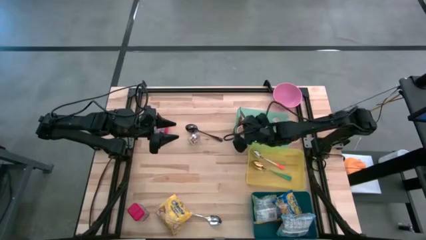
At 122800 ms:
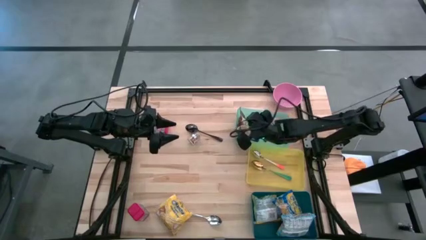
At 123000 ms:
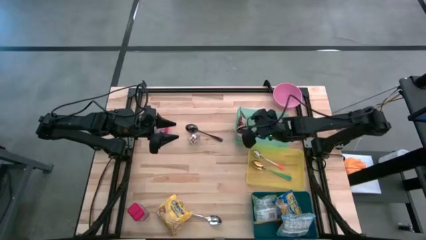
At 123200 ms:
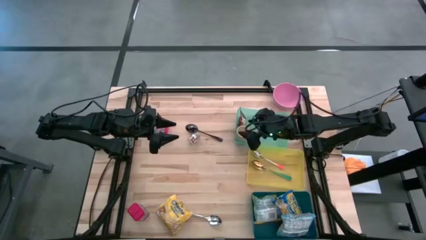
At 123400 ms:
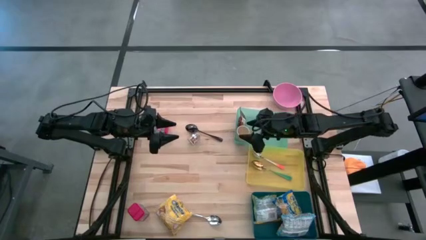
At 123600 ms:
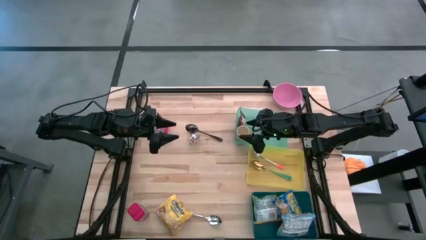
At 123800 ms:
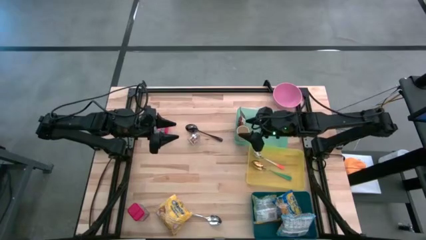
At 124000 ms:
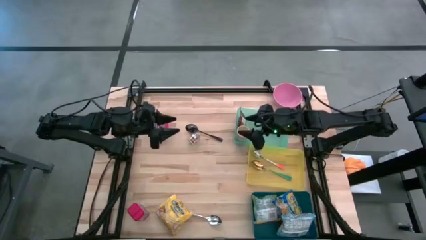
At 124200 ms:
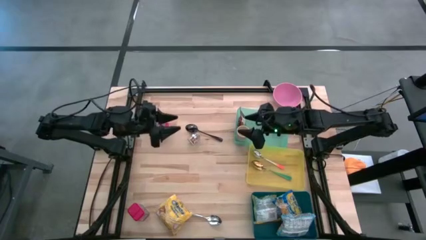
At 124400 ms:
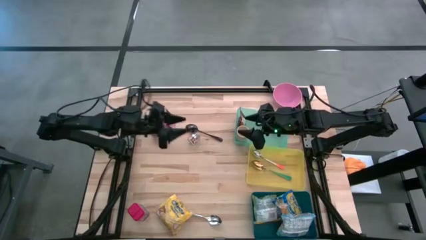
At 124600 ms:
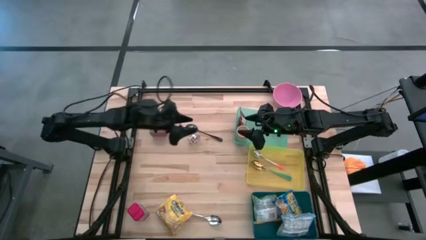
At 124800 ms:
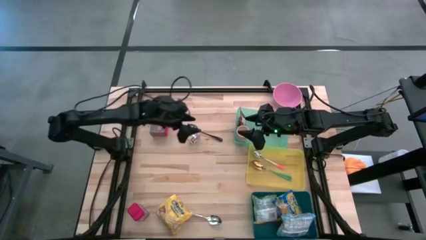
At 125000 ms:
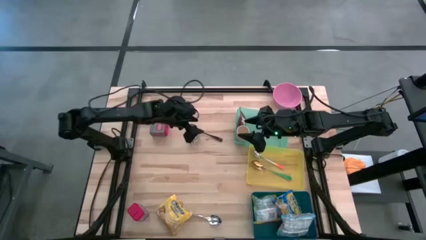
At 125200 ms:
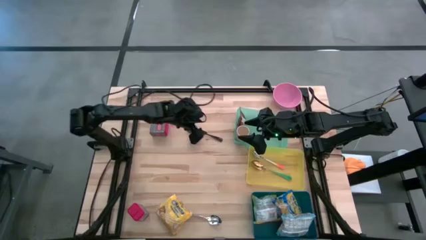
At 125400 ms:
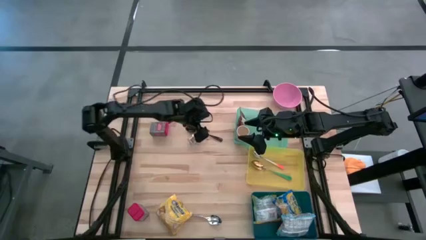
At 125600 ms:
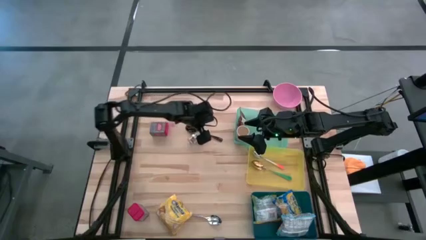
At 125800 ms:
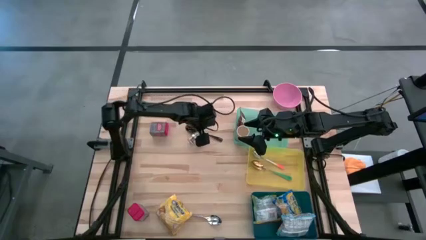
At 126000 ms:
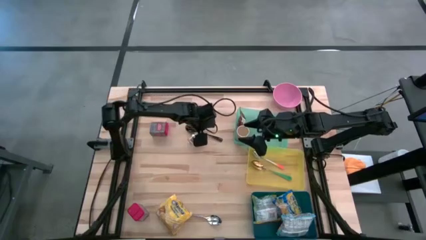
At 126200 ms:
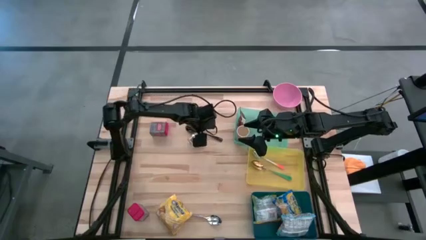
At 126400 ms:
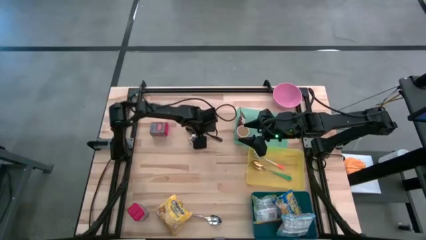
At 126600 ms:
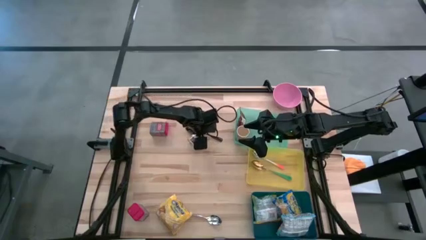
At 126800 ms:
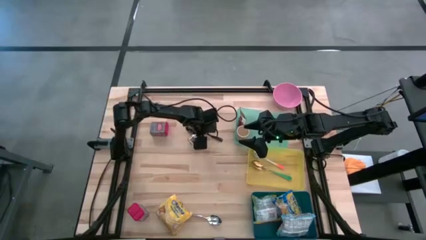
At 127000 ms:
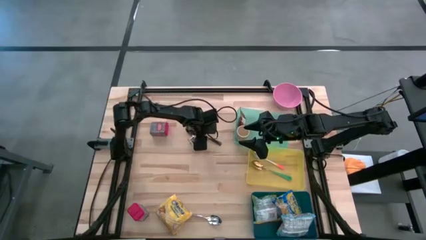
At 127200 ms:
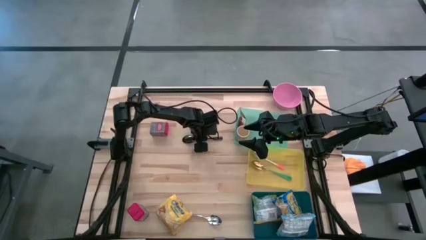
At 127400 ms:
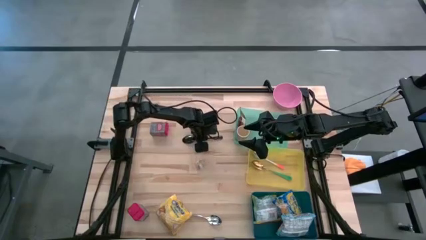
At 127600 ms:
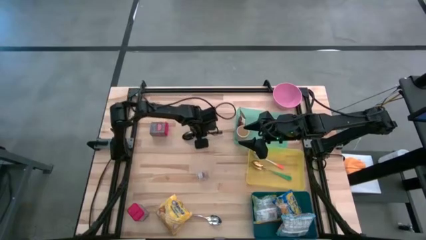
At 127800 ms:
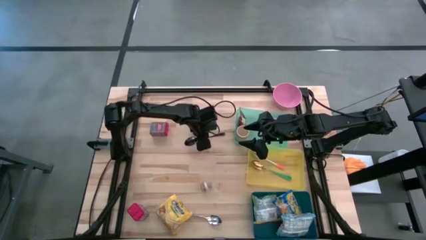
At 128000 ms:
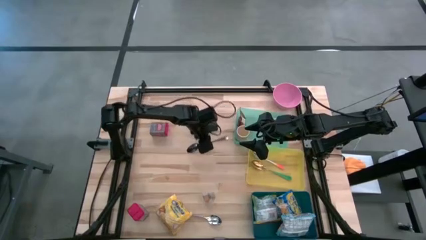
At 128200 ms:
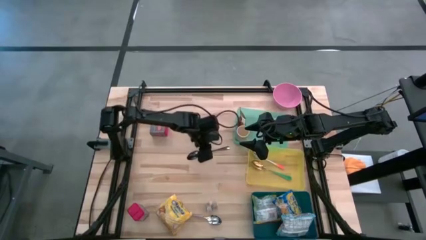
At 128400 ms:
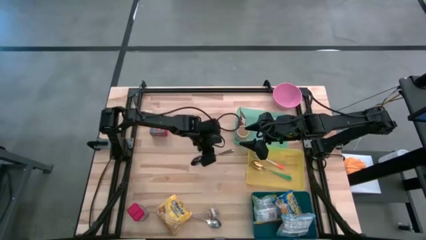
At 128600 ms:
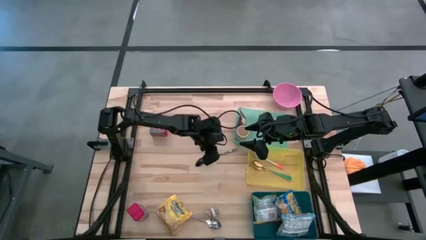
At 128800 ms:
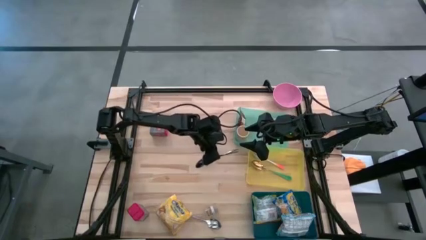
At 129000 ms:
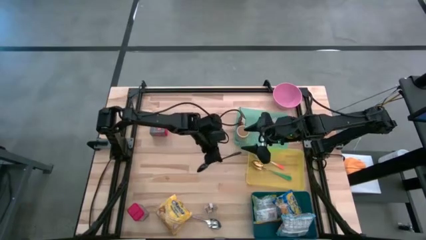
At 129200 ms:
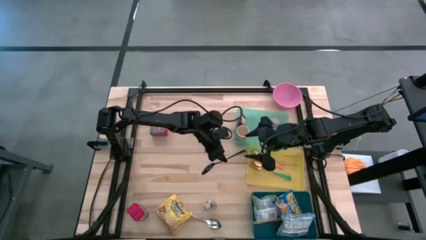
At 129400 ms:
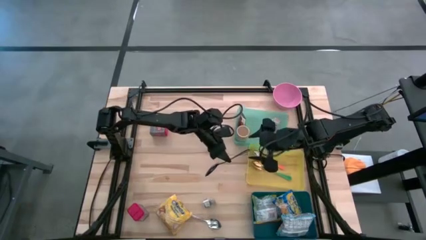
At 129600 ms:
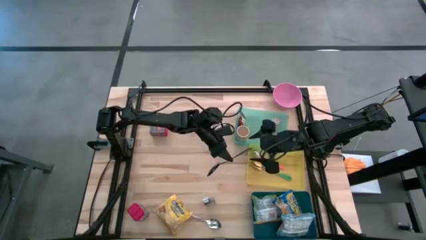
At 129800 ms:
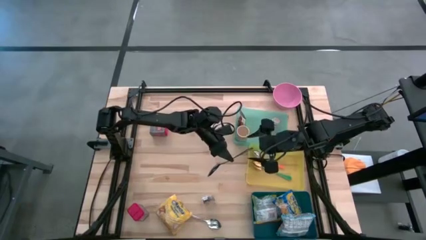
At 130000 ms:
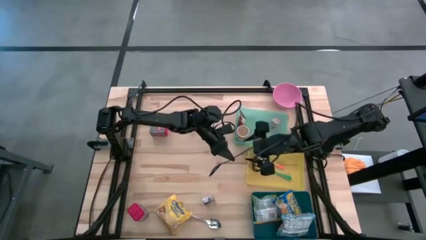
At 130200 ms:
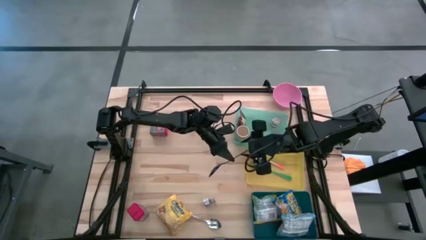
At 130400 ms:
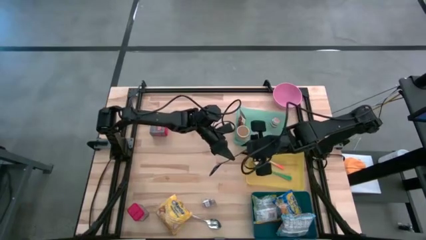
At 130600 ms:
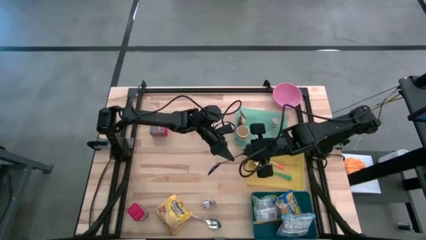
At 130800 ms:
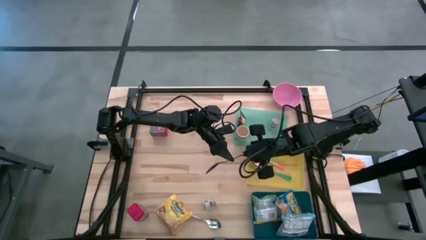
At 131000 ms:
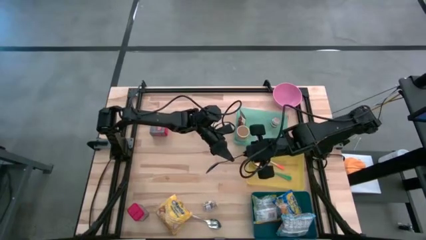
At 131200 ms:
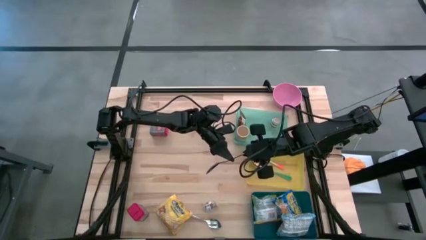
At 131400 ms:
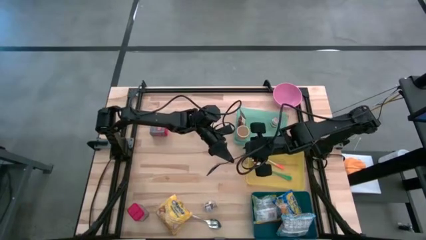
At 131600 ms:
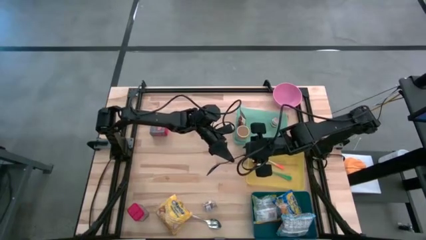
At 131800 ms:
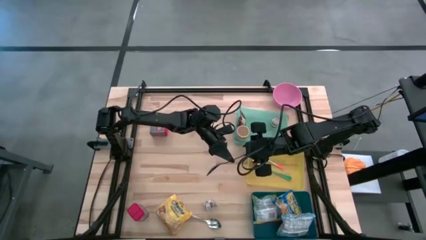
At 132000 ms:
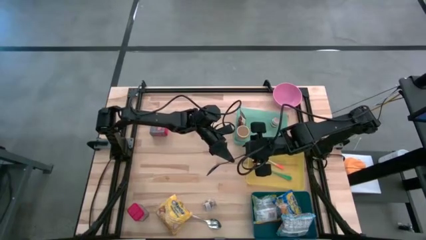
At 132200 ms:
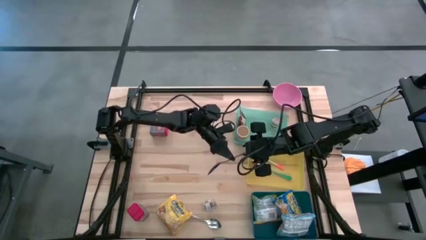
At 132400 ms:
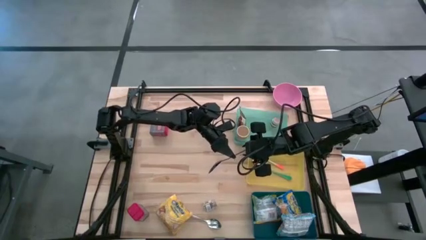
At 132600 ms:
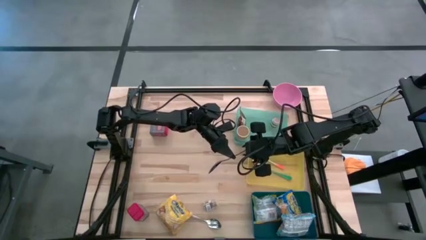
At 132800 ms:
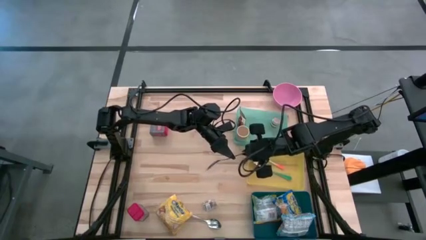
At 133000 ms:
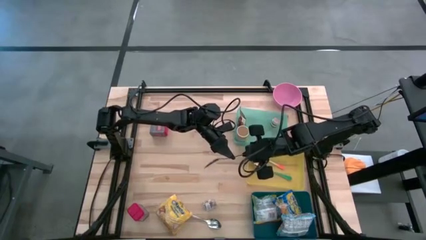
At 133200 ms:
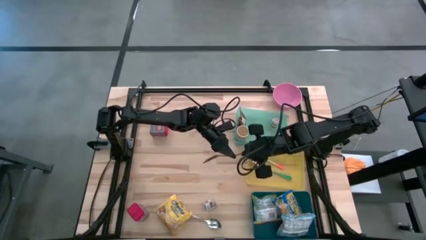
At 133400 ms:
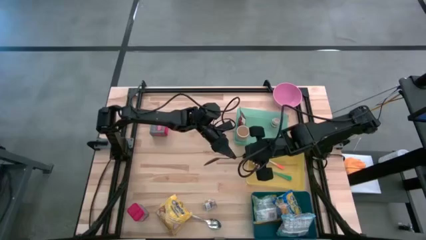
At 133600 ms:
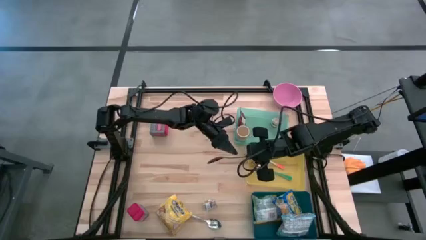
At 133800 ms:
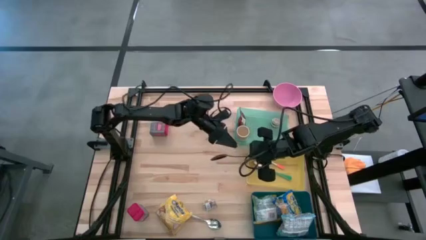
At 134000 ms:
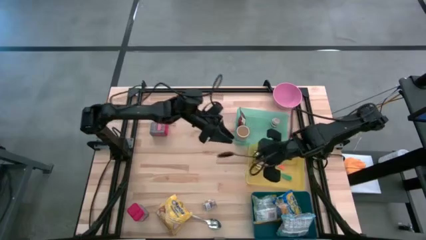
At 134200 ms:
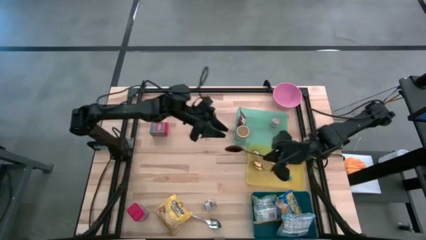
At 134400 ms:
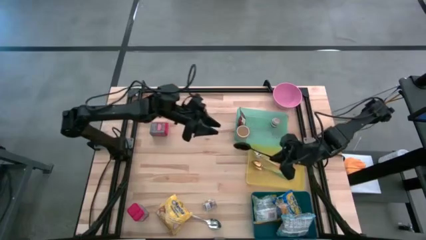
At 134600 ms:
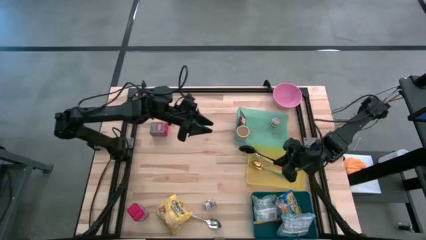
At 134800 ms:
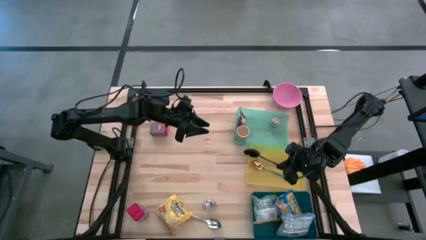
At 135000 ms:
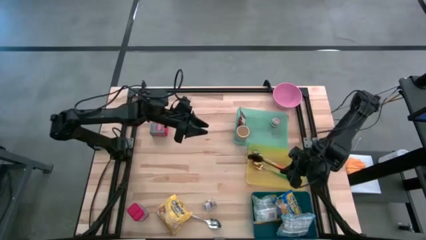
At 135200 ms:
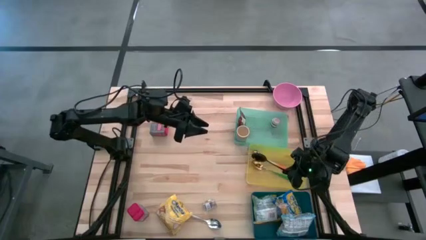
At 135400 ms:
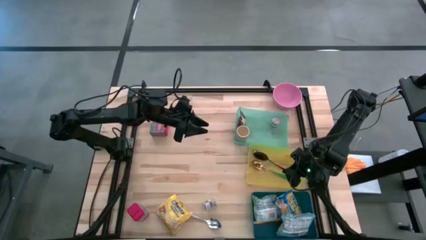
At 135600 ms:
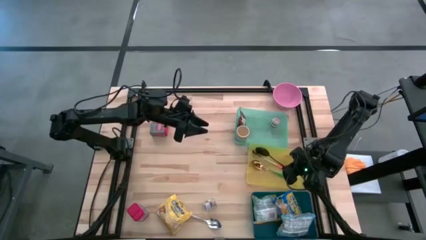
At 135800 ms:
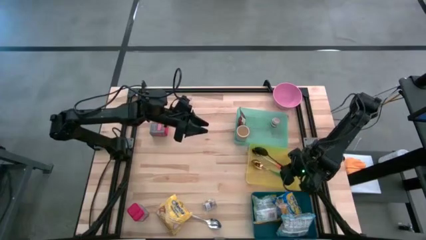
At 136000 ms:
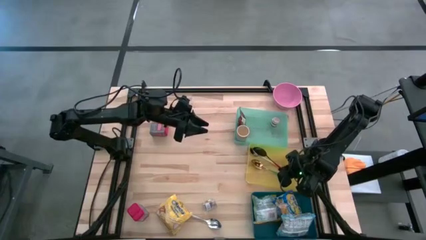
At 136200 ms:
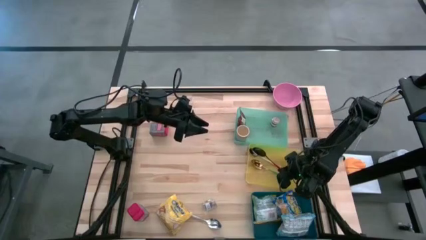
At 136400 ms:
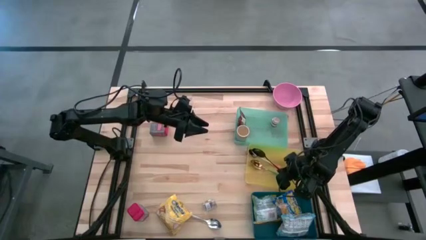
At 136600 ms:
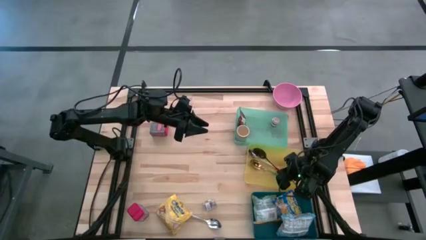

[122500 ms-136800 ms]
Put the black spoon into the yellow bin
